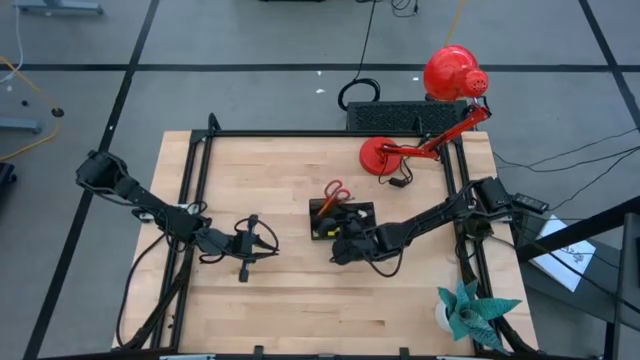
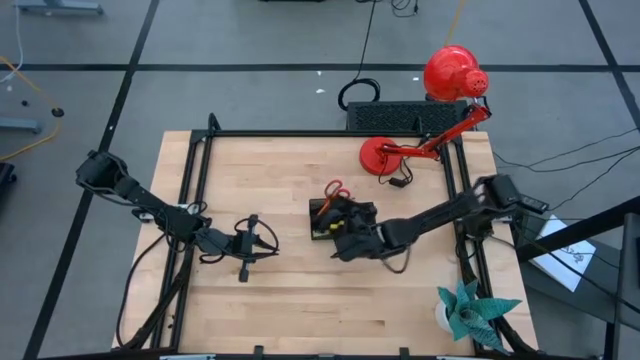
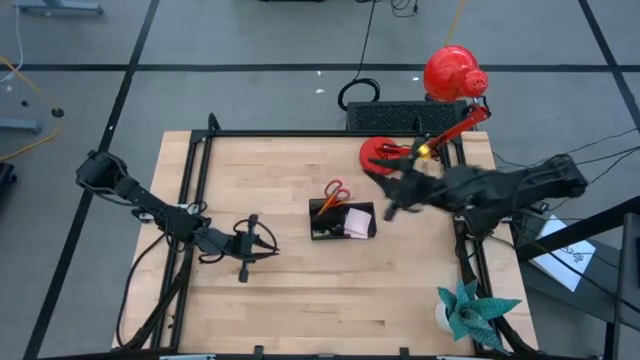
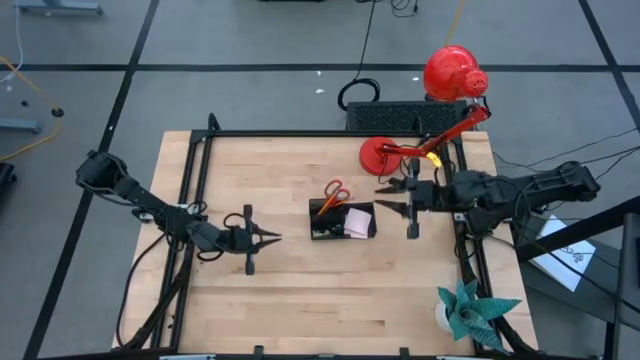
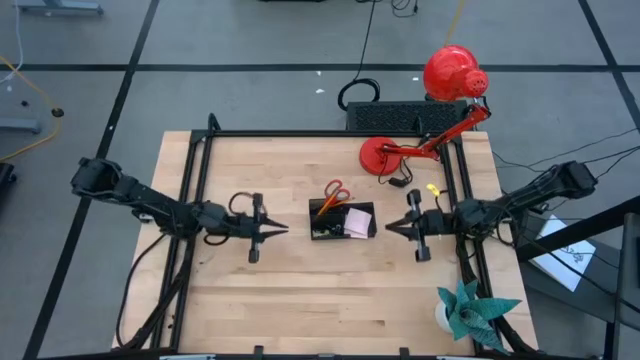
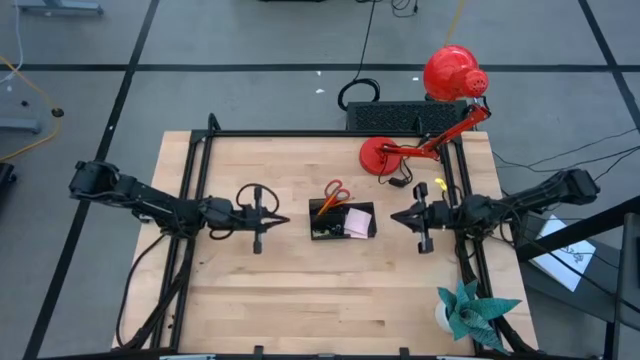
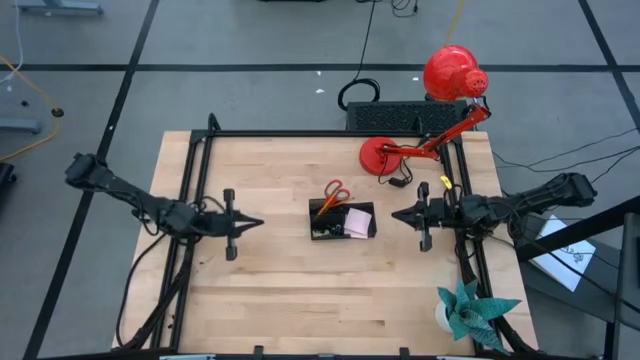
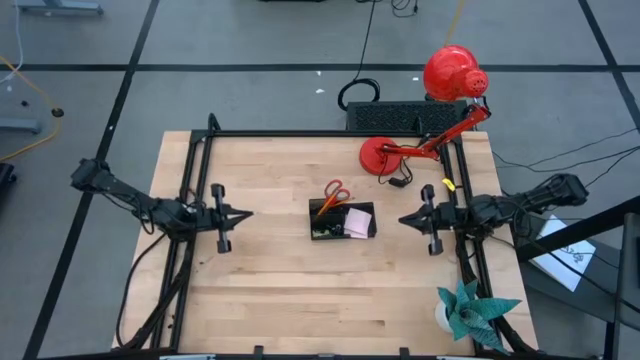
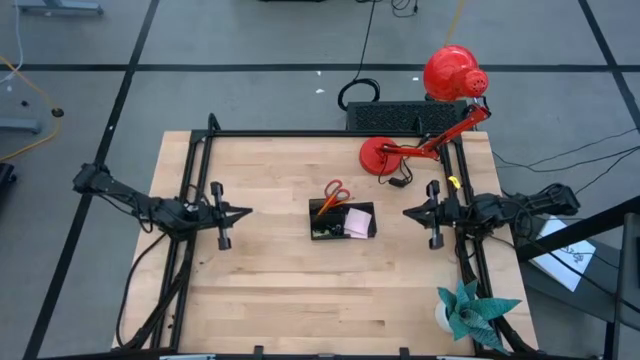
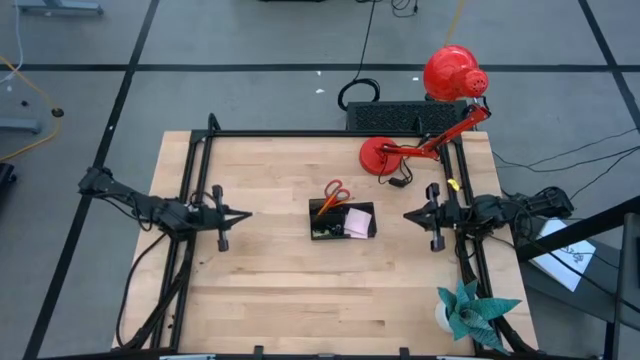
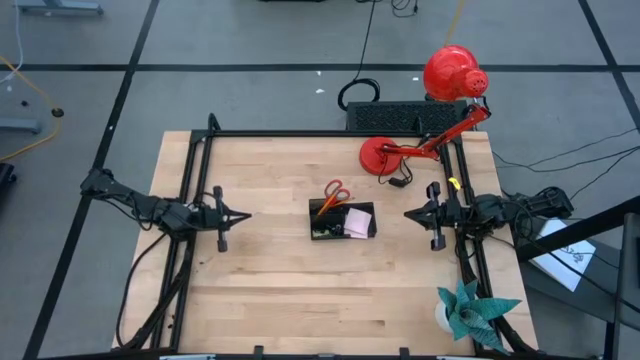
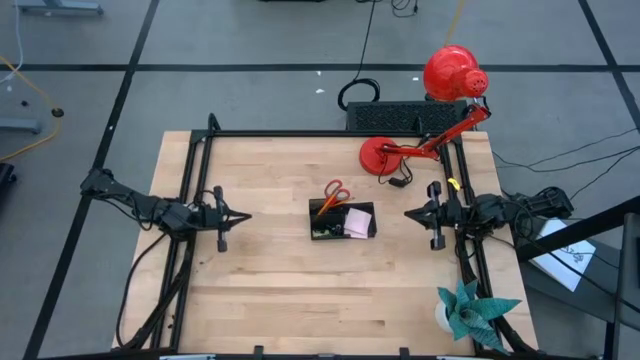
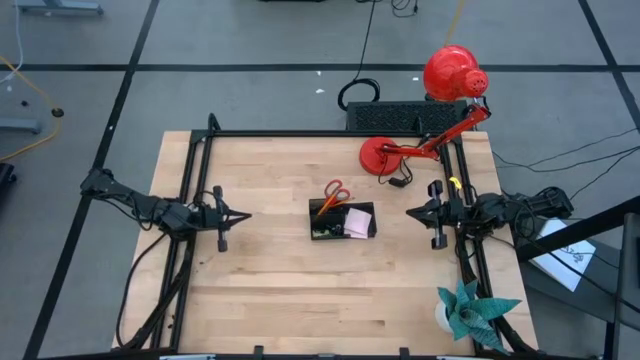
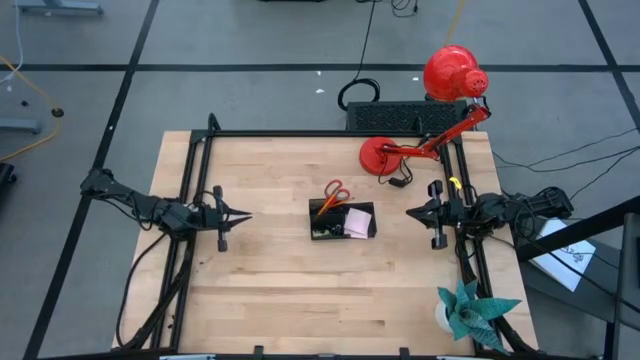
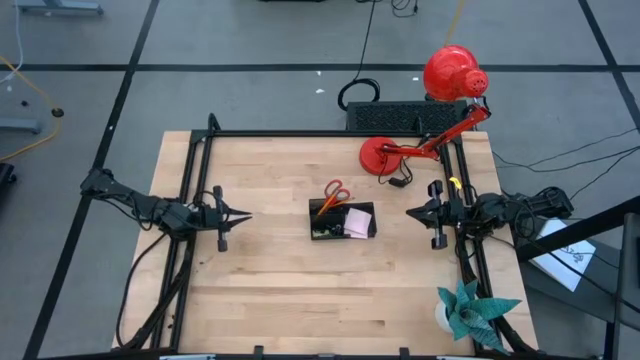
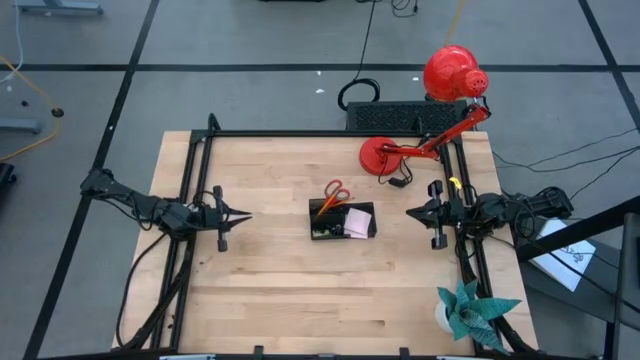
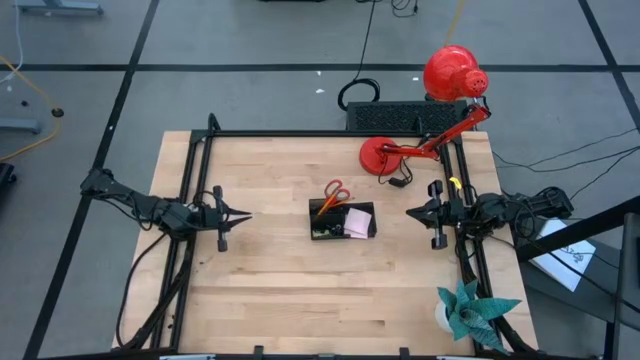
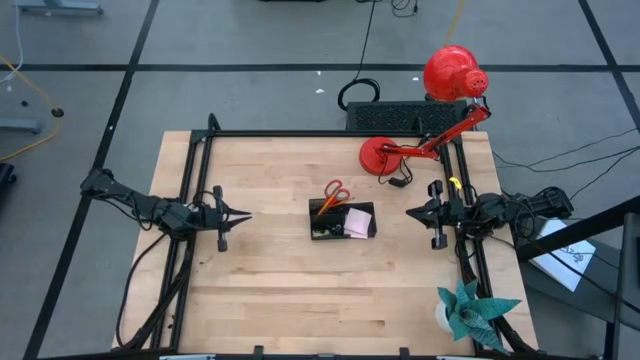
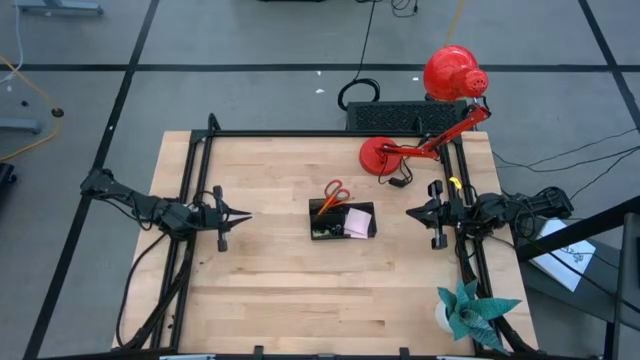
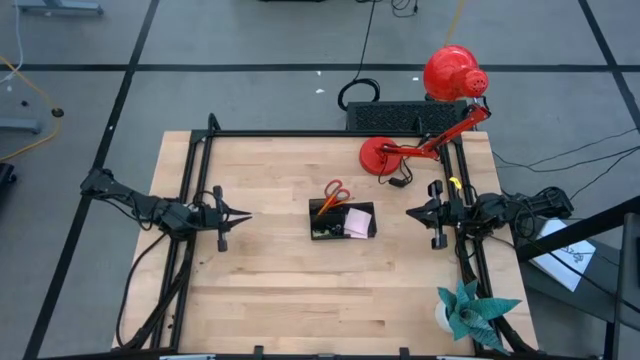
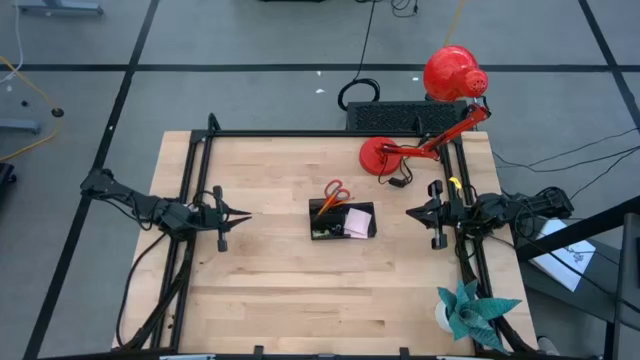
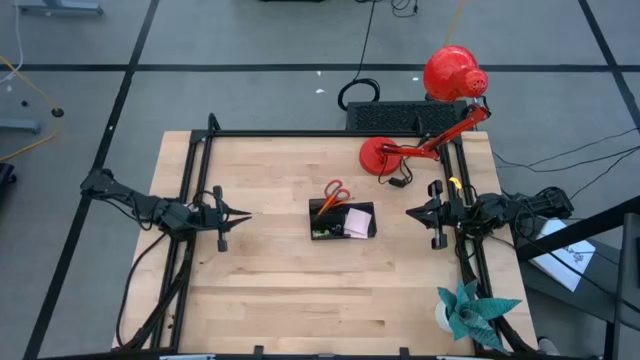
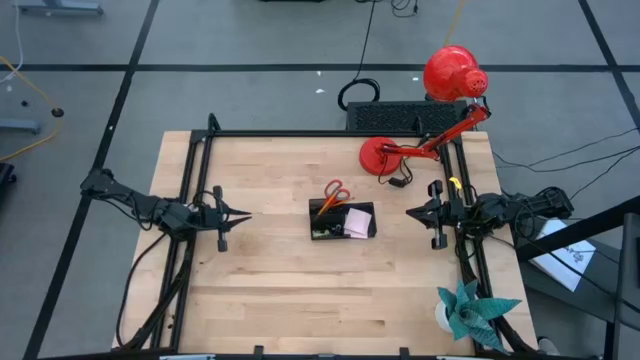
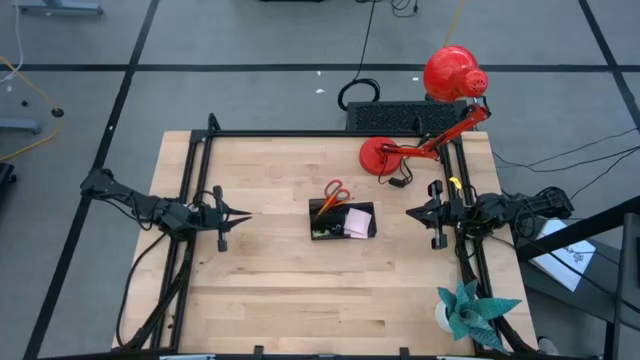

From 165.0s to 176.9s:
Task: Pick and place office supplies into organizer
Return to Home Position

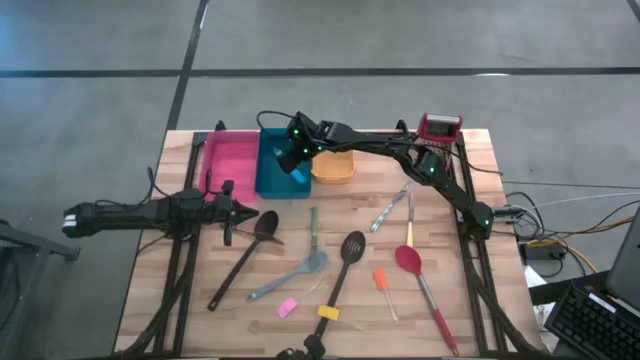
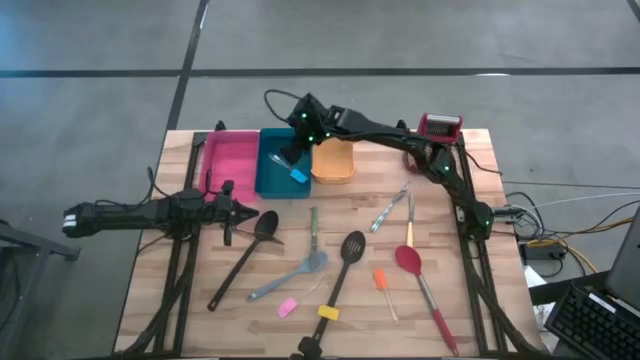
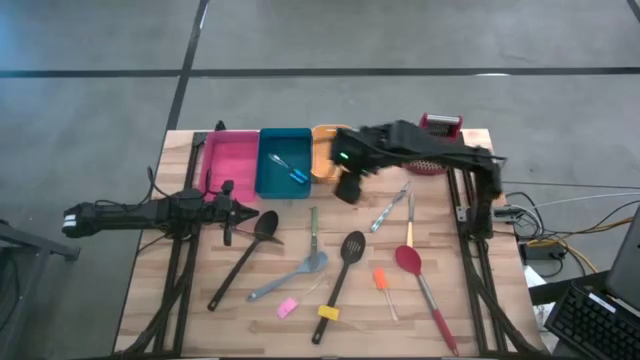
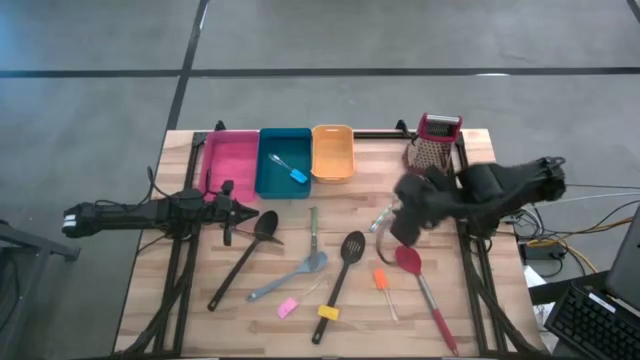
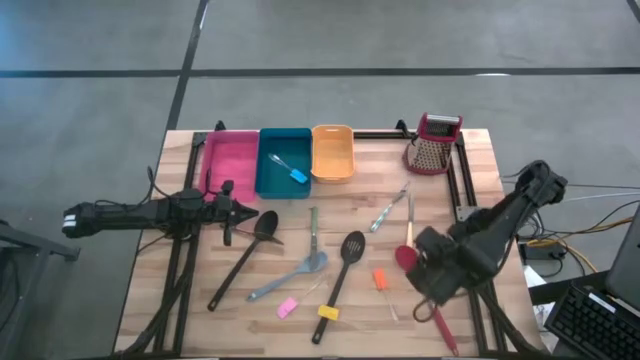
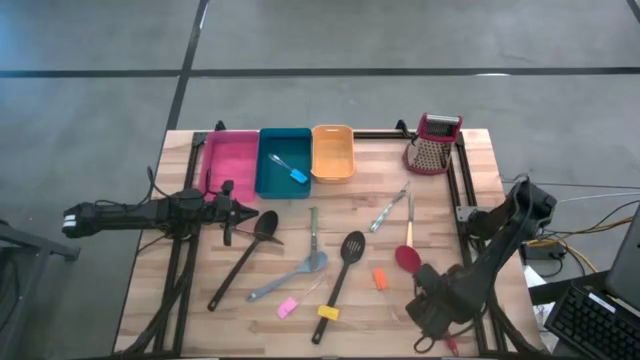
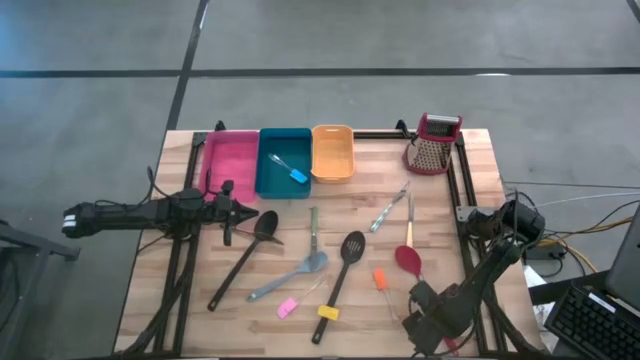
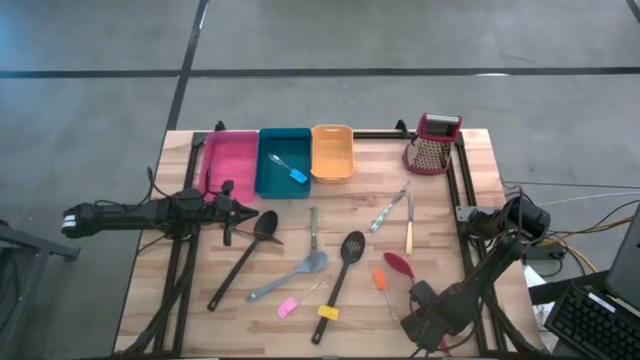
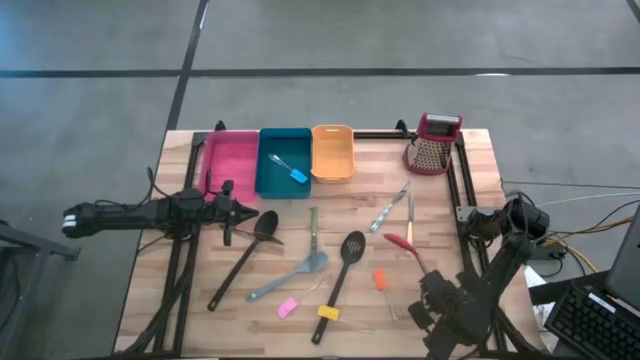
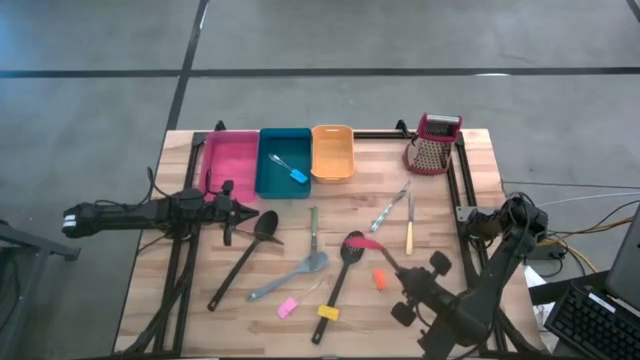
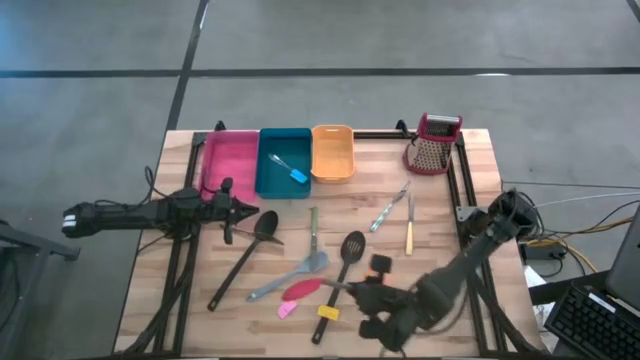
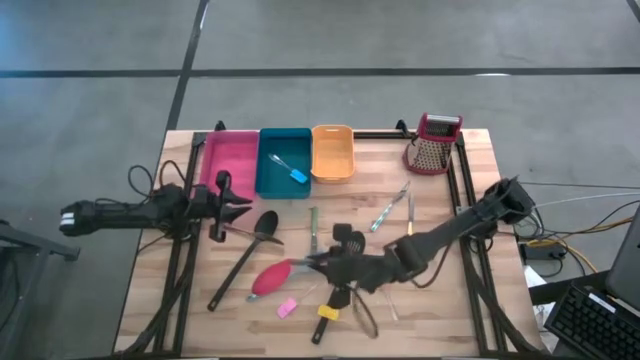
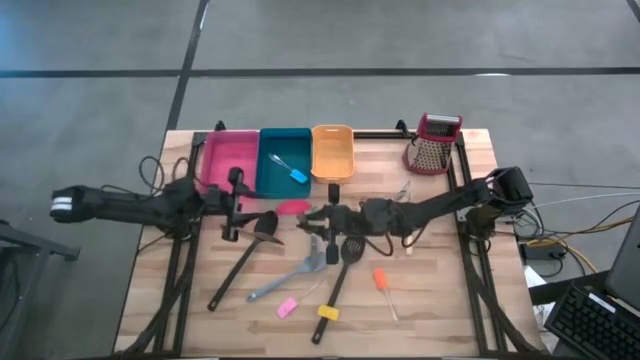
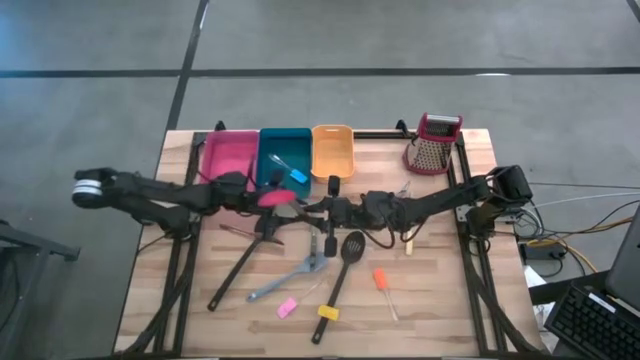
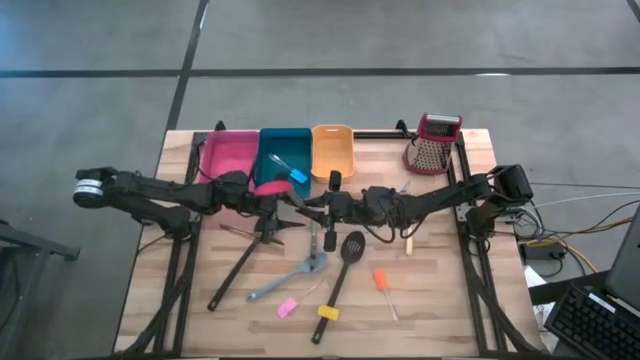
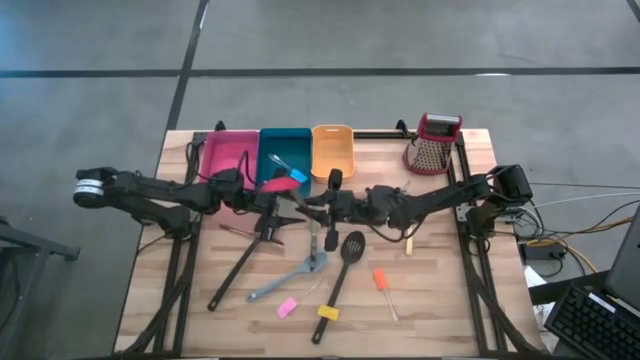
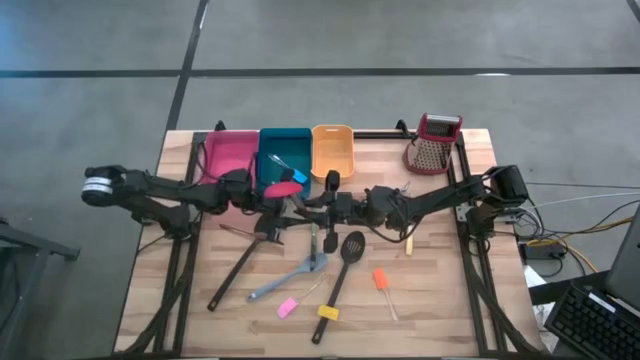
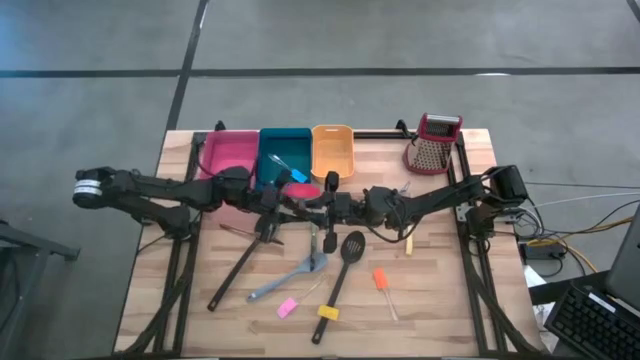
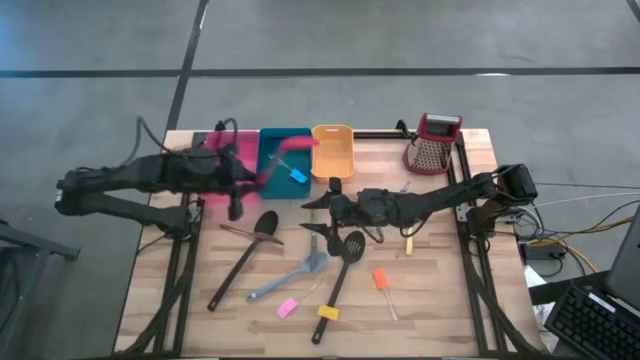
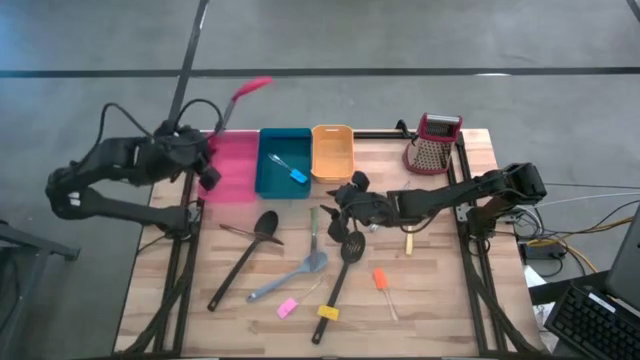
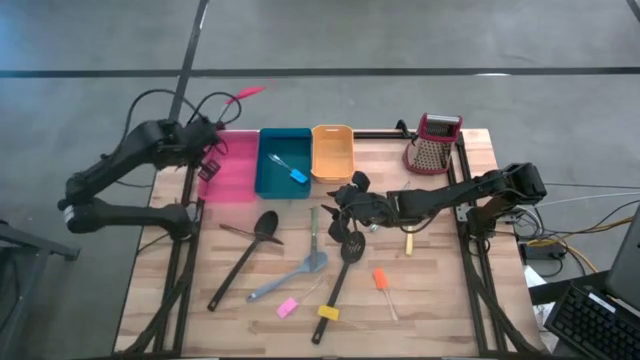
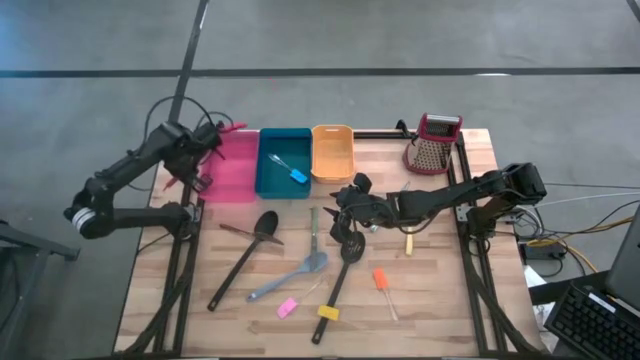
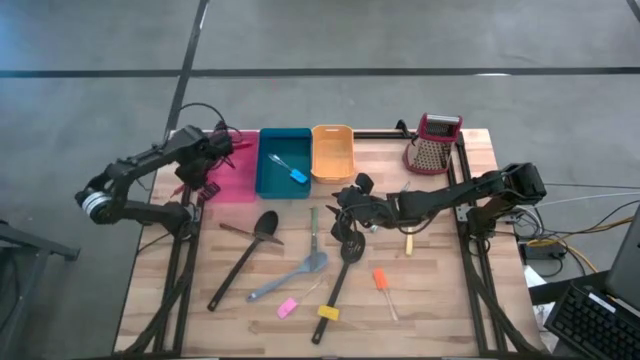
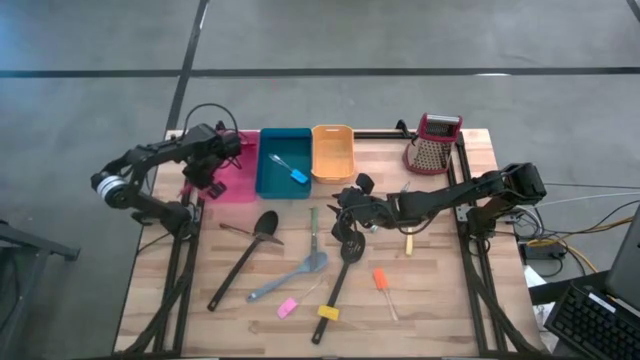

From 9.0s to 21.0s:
Task: Pick & Place Kitchen Items
Put the red serving spoon into the pink bin
